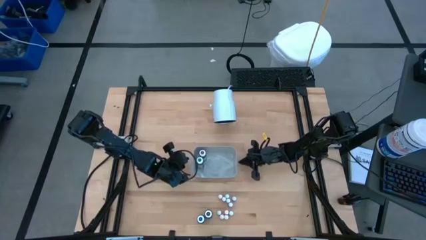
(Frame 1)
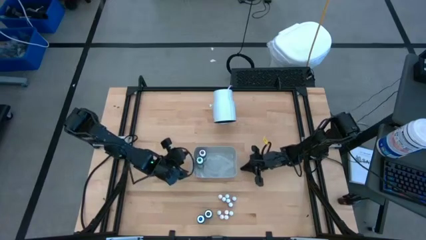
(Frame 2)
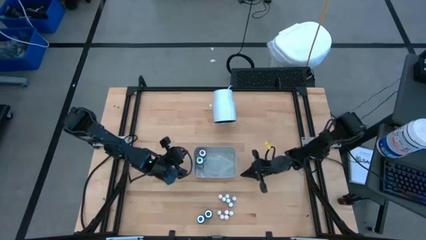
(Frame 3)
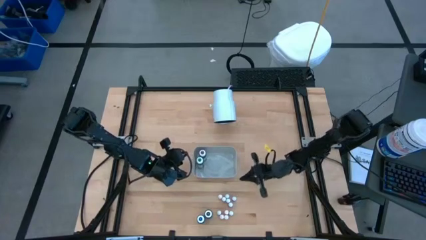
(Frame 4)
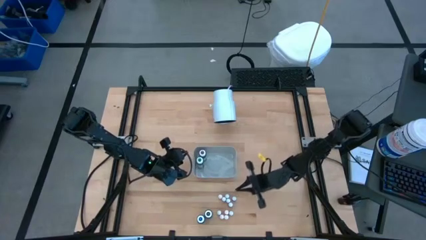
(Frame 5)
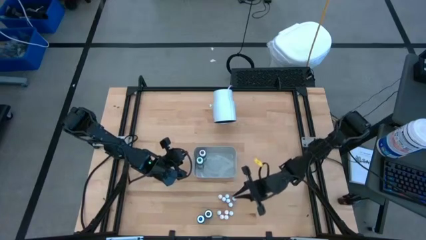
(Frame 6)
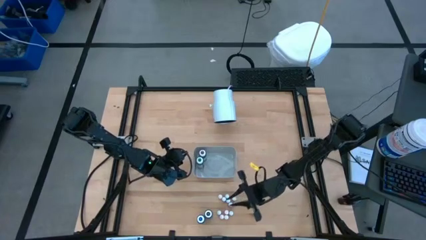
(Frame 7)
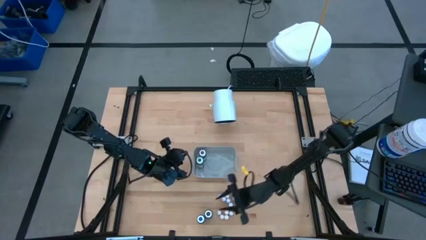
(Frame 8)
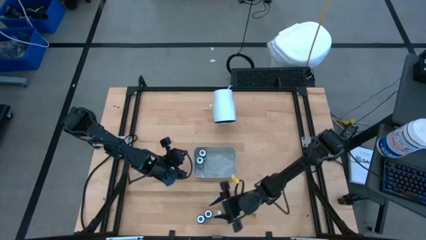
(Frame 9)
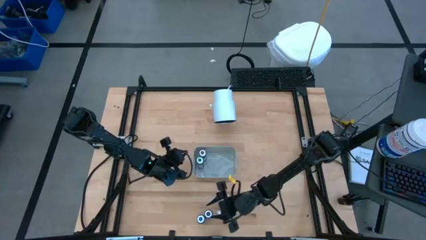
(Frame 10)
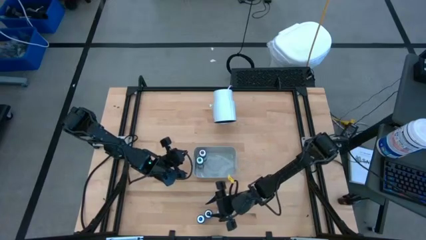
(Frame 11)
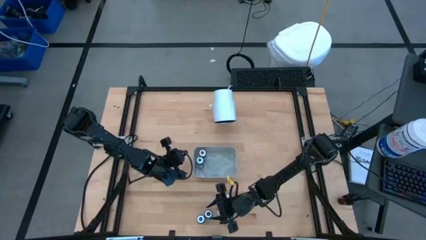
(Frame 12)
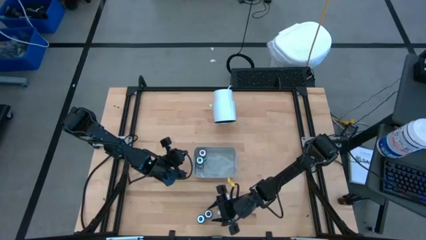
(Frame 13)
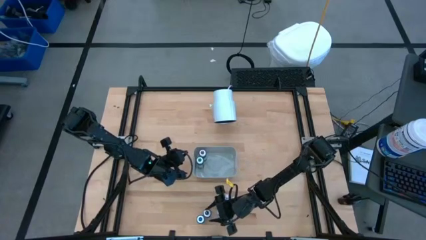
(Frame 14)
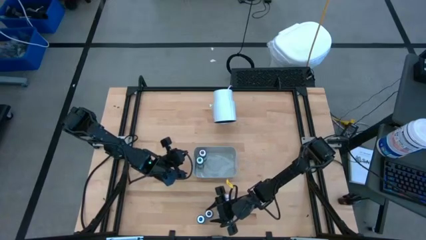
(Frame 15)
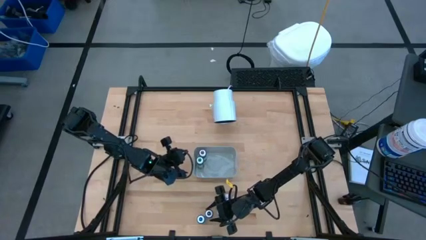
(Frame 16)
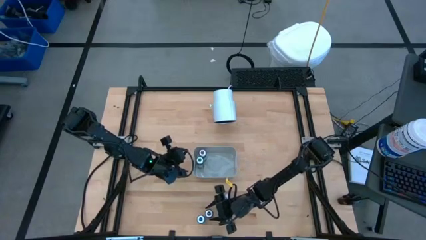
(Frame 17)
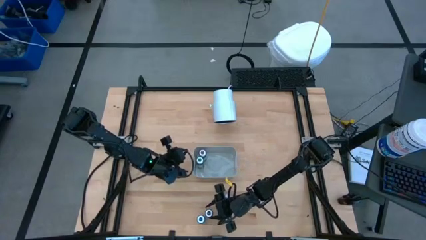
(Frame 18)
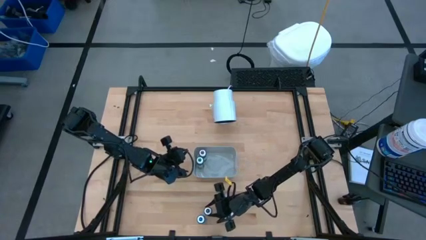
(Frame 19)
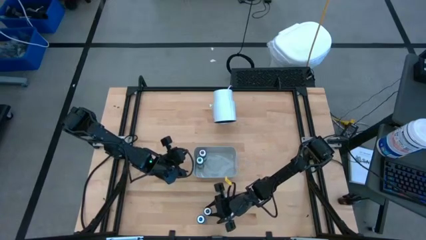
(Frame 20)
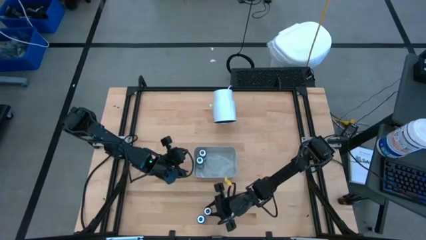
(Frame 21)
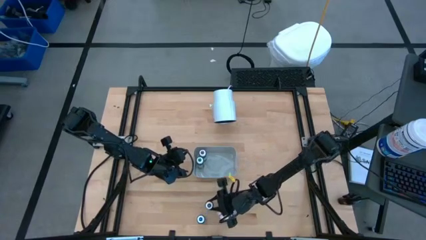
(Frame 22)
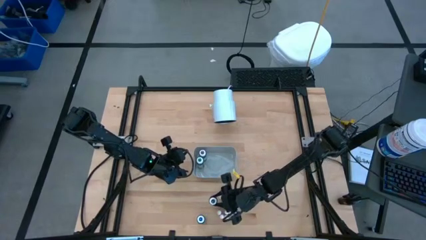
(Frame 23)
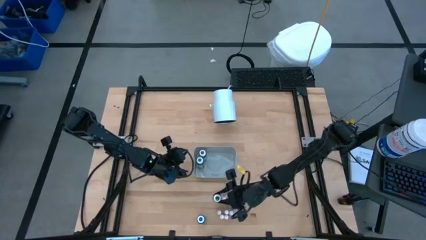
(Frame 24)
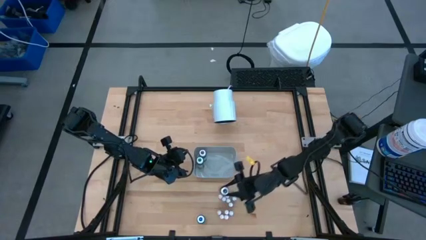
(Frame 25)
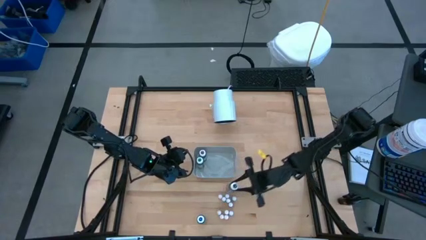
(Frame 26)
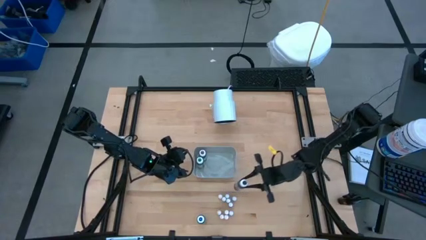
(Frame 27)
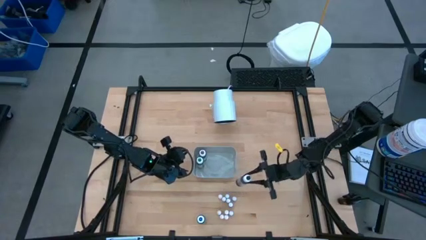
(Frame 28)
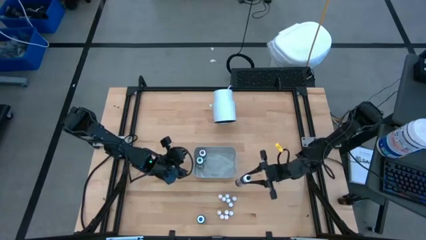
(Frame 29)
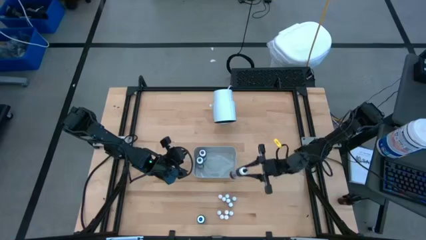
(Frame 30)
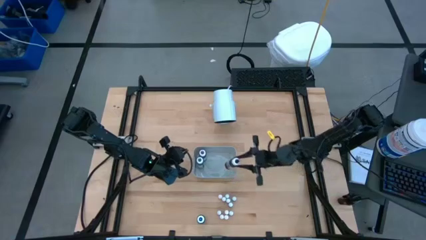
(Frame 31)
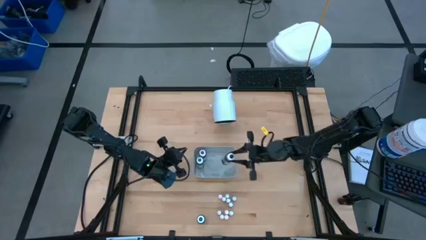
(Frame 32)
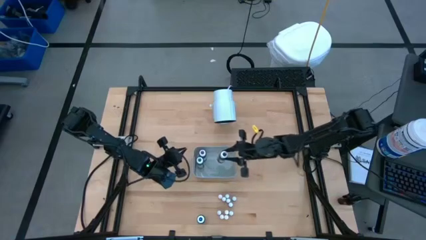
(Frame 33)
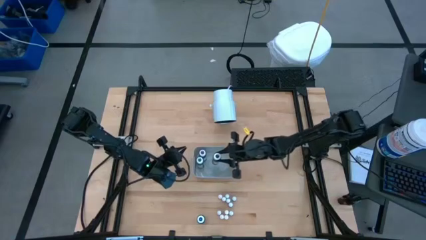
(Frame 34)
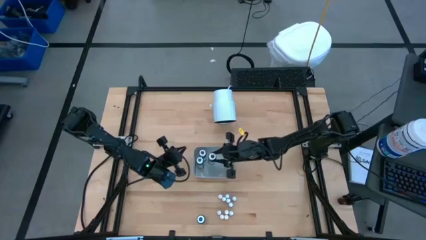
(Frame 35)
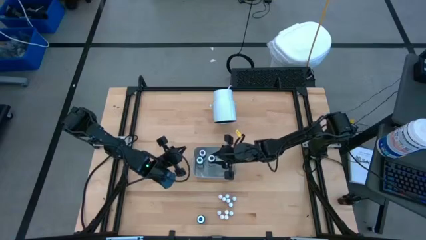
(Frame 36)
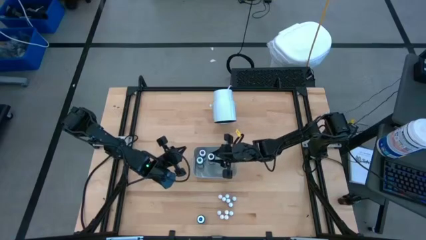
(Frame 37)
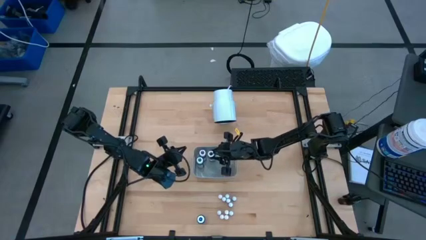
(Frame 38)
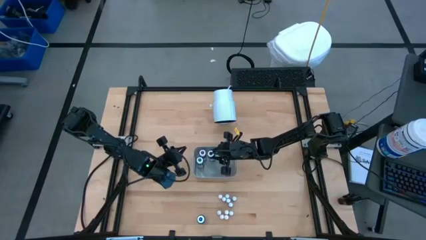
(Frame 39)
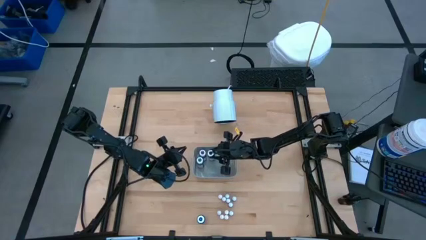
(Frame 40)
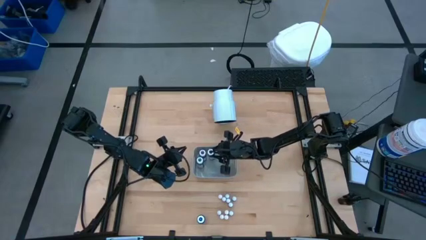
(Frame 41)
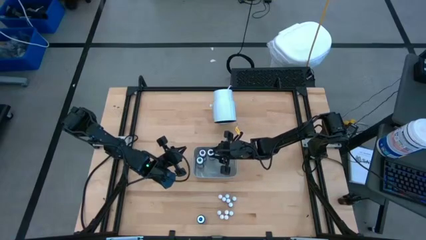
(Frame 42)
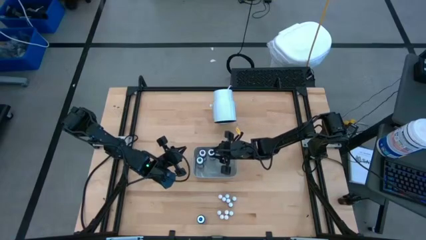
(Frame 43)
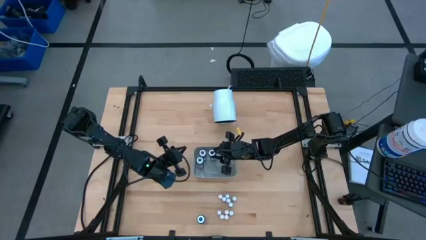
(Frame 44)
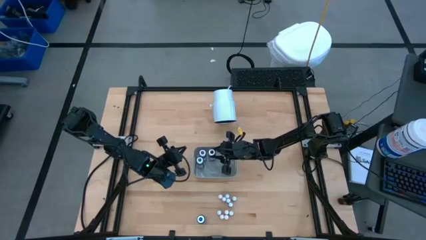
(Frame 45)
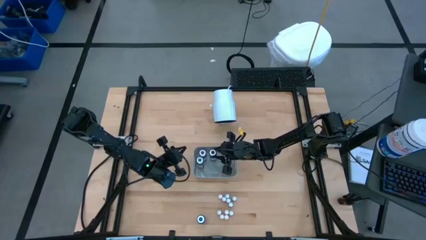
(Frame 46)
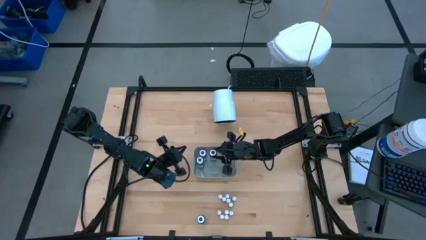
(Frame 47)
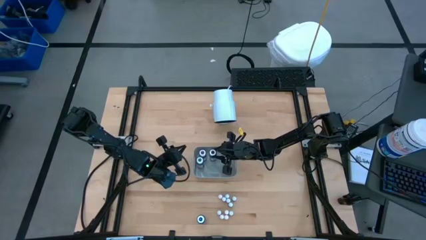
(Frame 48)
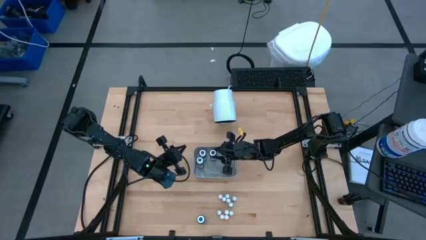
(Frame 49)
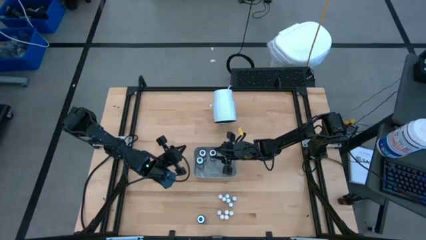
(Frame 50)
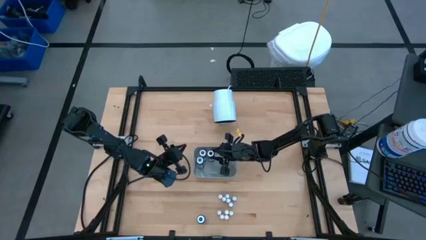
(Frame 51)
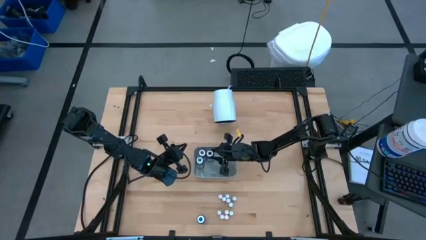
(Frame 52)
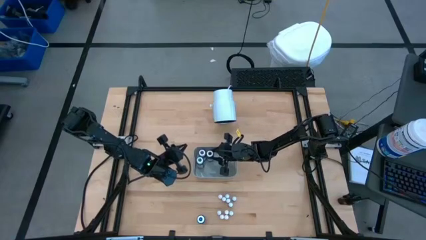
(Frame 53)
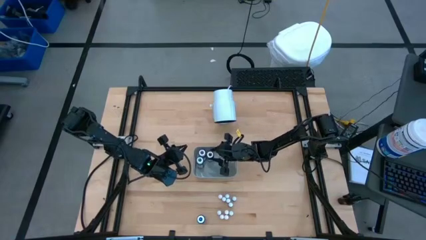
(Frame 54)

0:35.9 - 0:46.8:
Task: Pick & Place food coloring
Put the large black food coloring bottle into the gray bin
